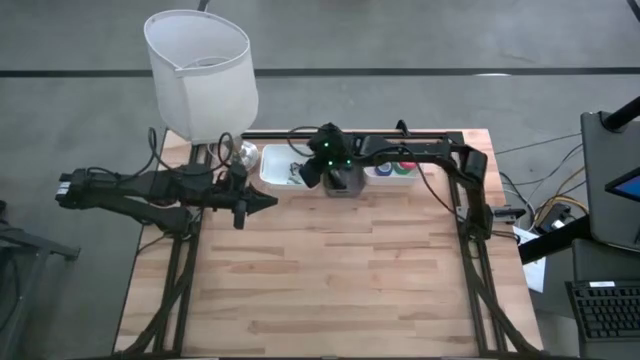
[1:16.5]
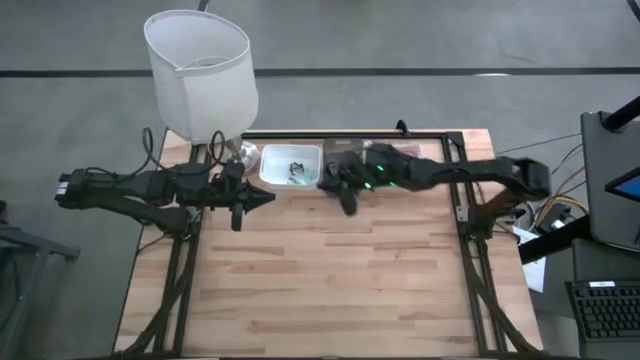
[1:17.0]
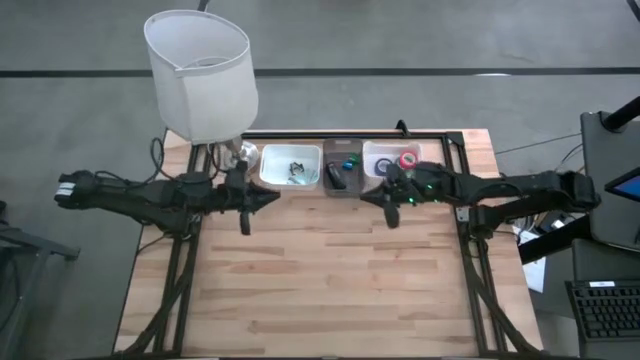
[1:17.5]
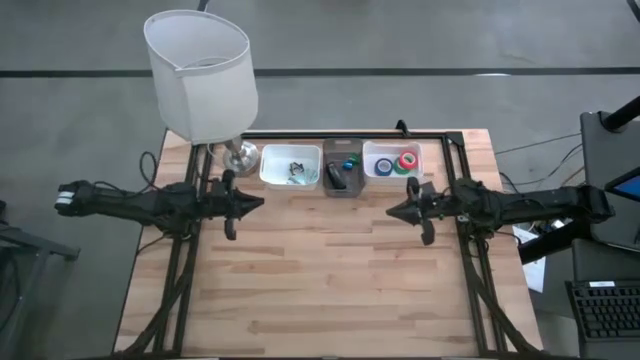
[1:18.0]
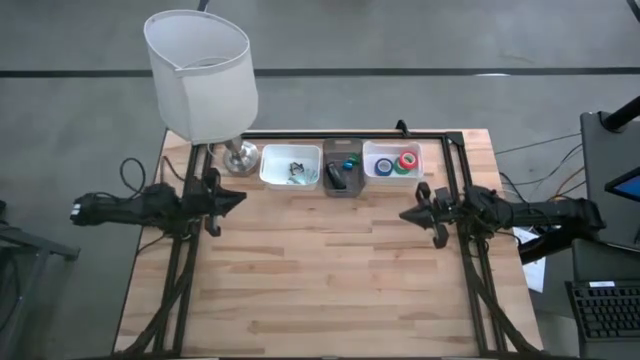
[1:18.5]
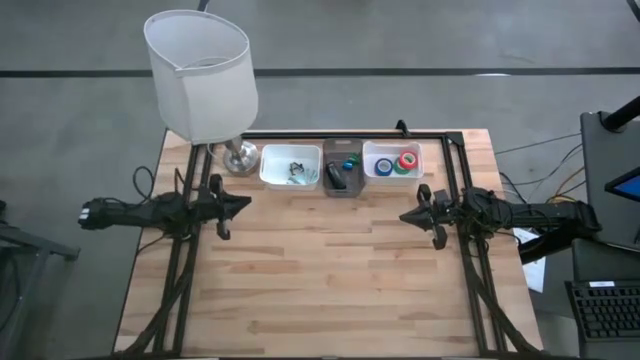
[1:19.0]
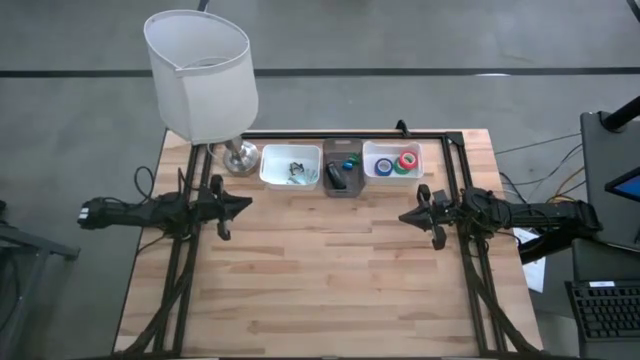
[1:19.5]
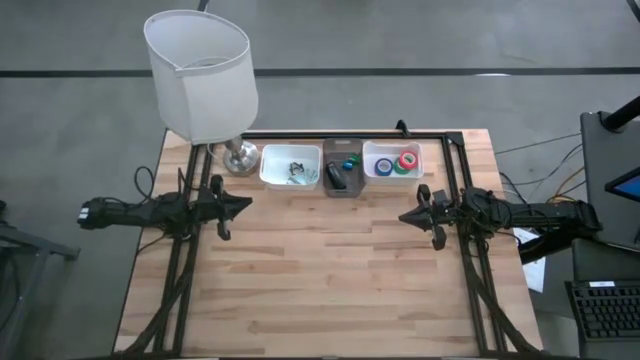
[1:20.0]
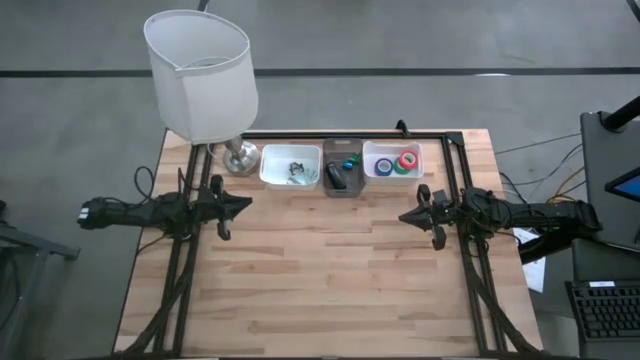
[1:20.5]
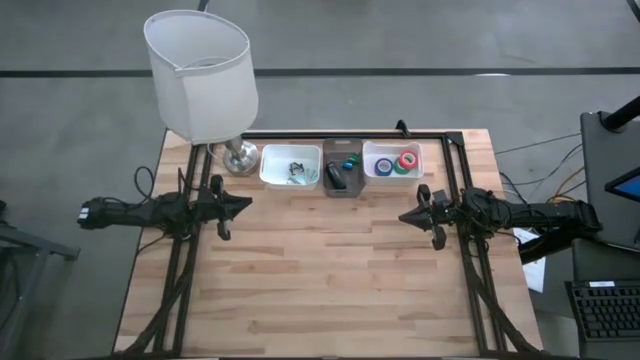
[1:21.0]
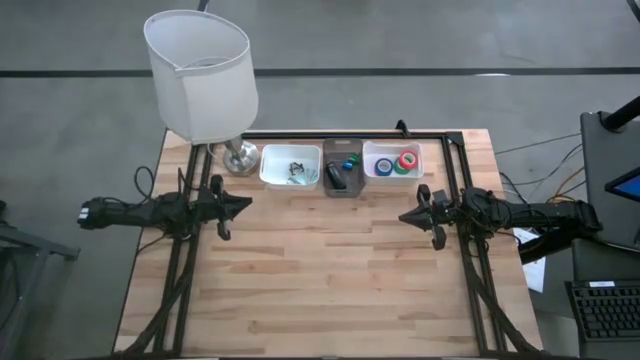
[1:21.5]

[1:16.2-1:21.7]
Task: Pick and place Stapler, Stapler remover, tape
Return to Home Position

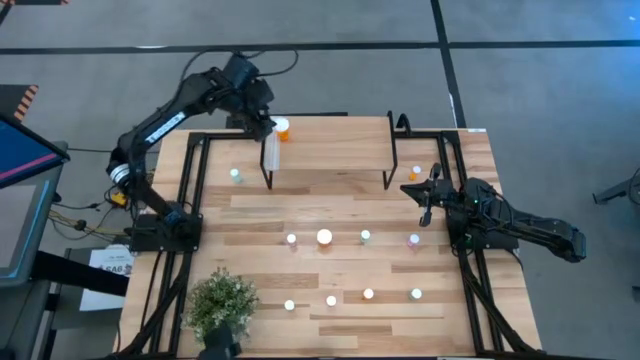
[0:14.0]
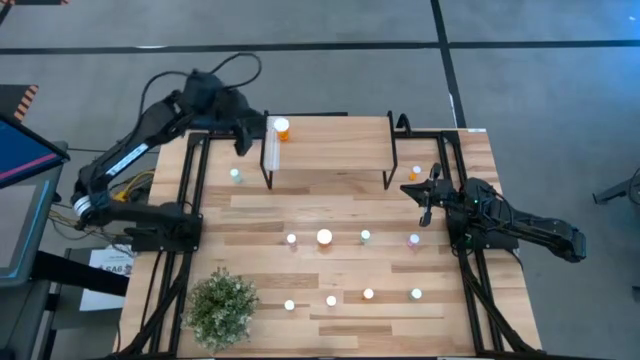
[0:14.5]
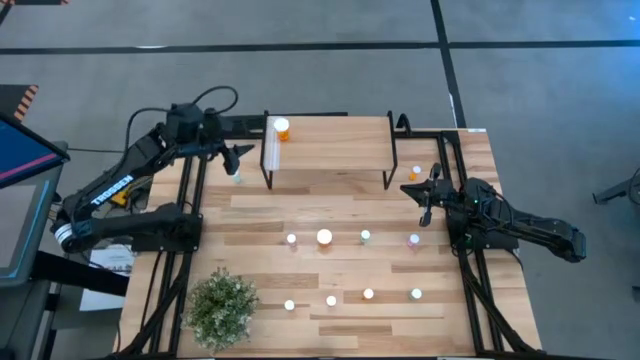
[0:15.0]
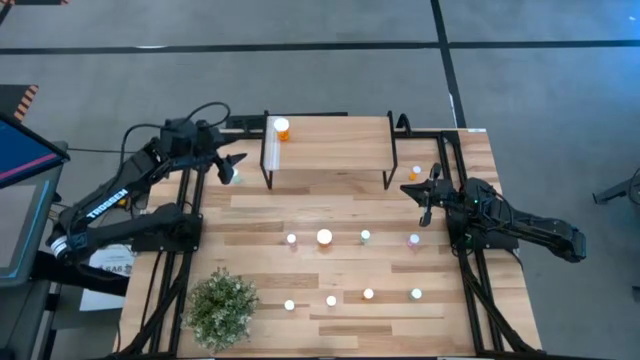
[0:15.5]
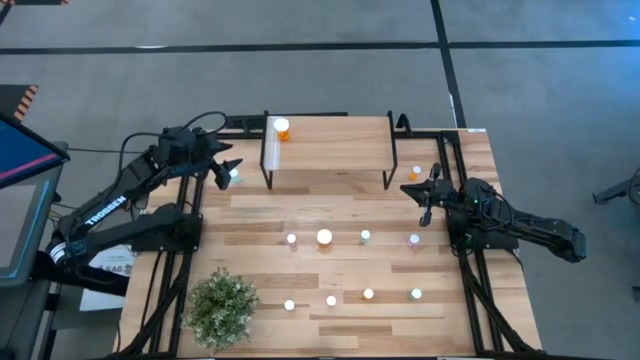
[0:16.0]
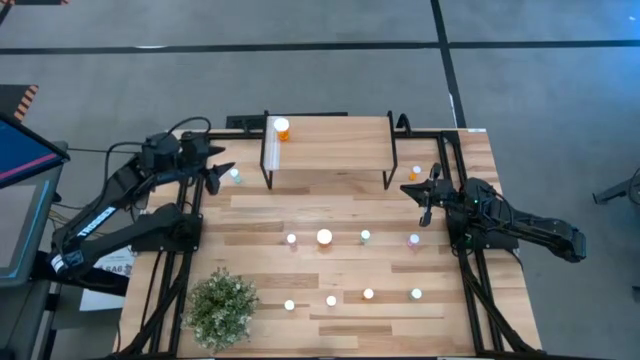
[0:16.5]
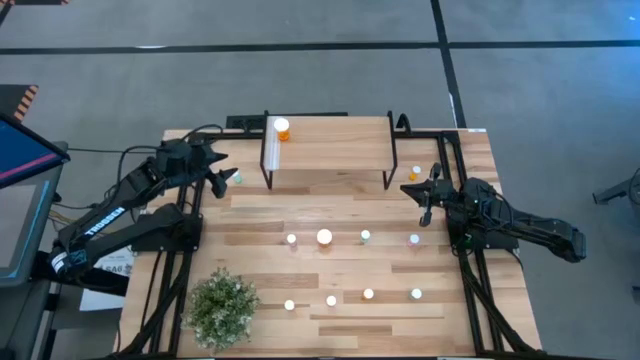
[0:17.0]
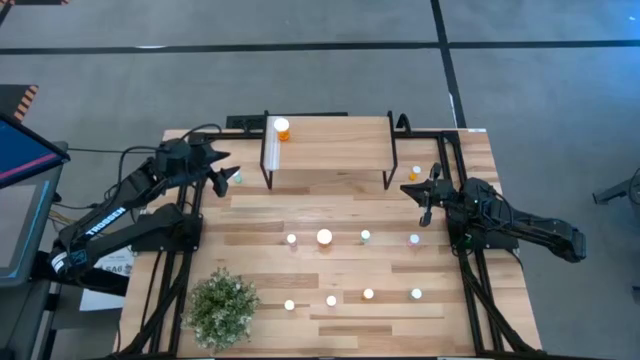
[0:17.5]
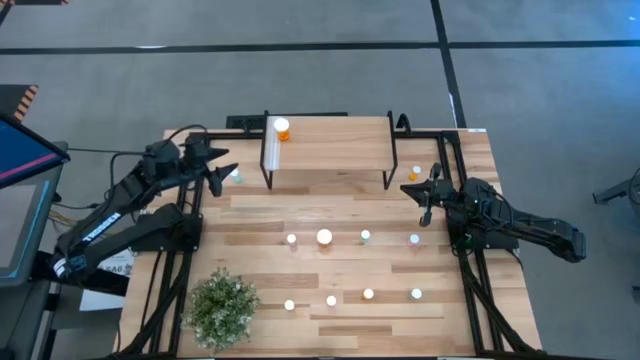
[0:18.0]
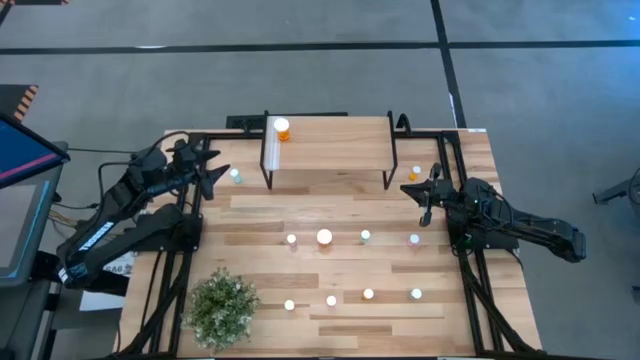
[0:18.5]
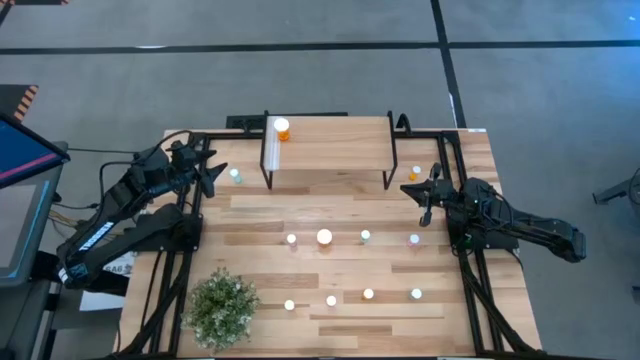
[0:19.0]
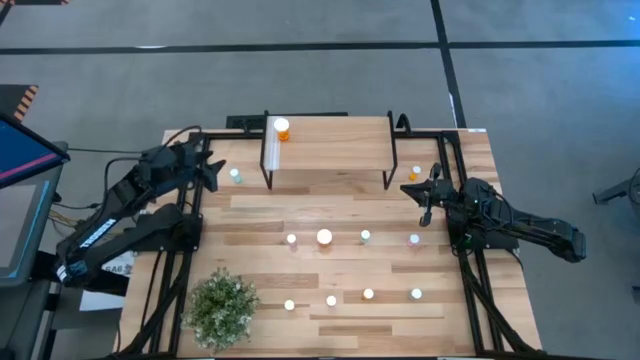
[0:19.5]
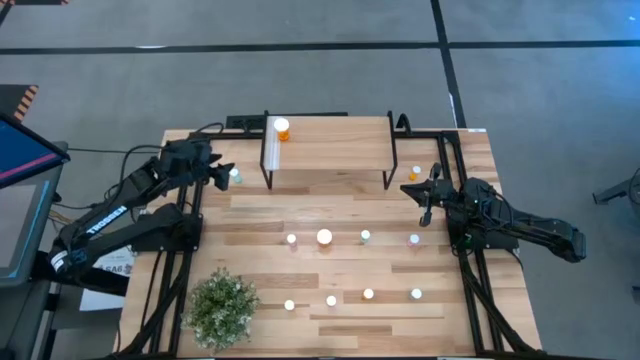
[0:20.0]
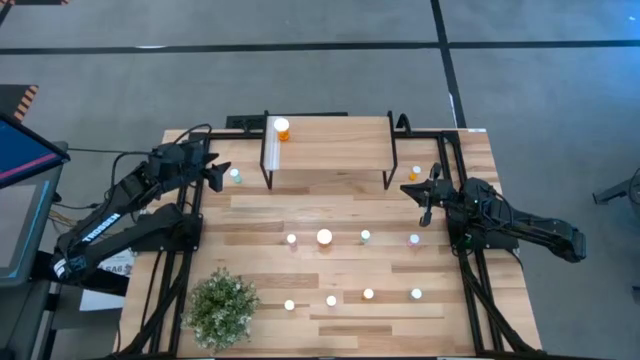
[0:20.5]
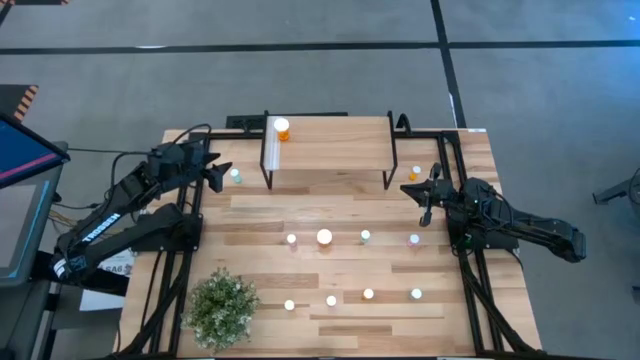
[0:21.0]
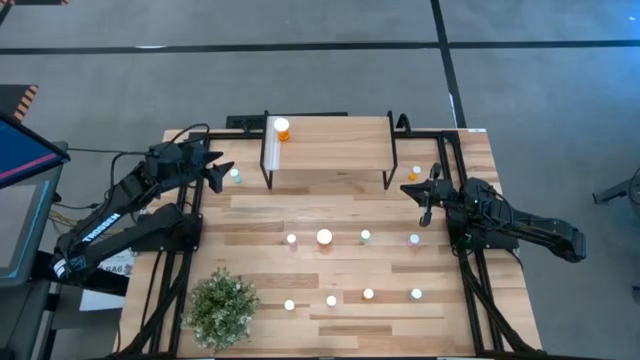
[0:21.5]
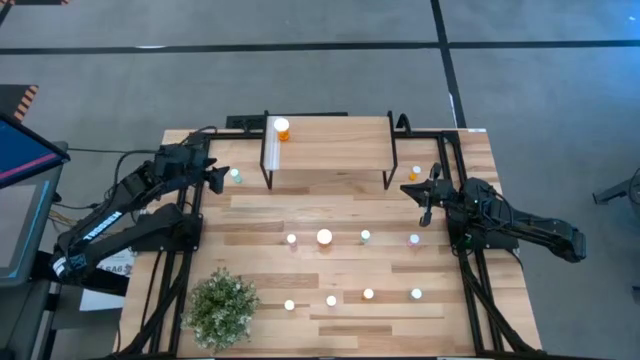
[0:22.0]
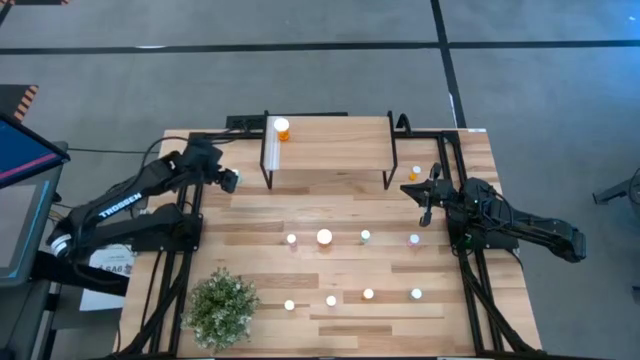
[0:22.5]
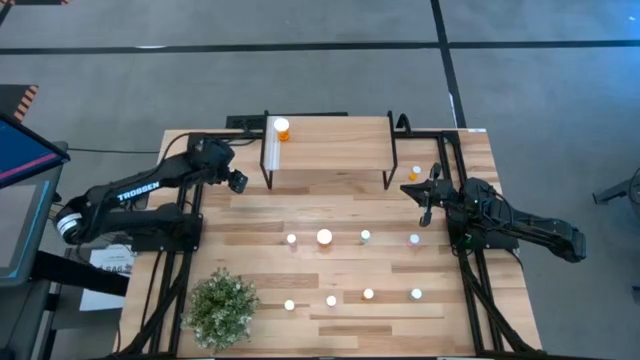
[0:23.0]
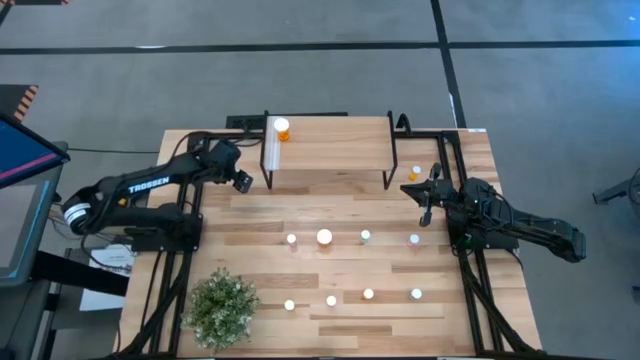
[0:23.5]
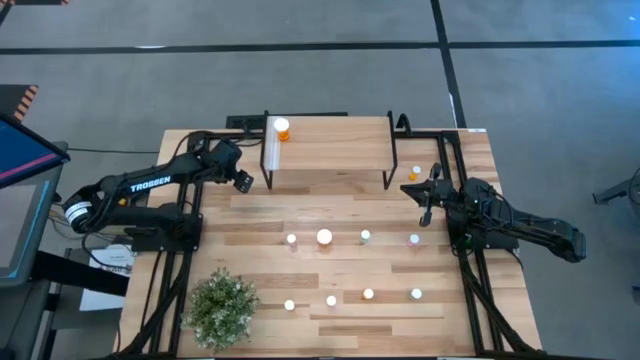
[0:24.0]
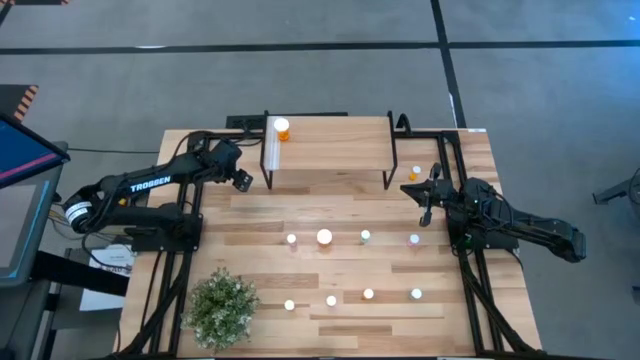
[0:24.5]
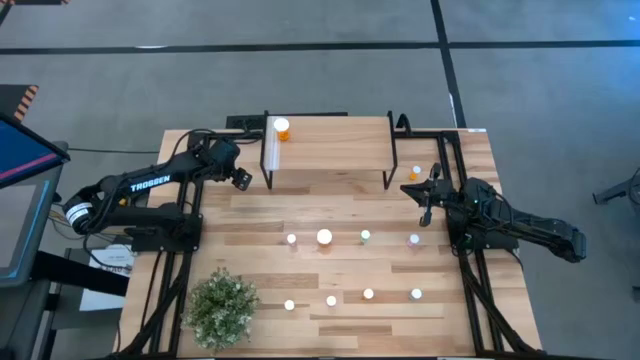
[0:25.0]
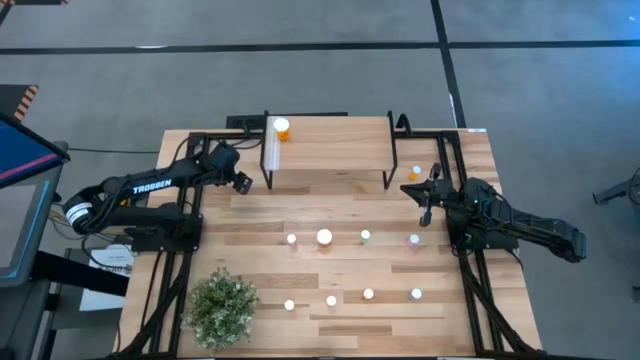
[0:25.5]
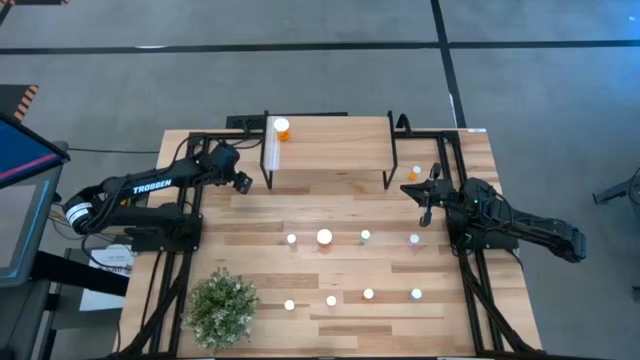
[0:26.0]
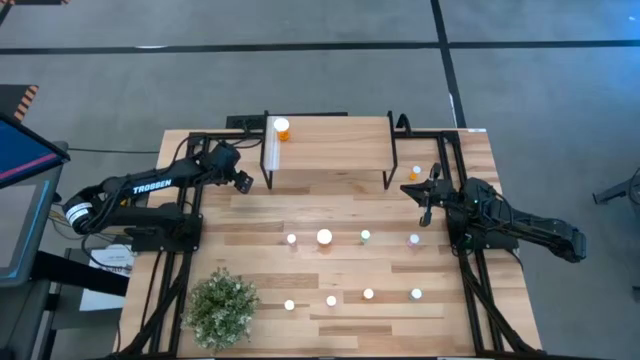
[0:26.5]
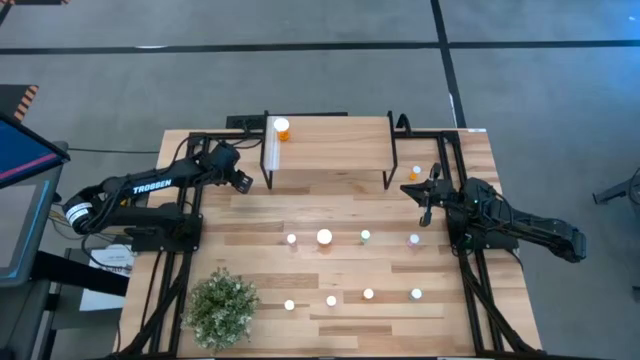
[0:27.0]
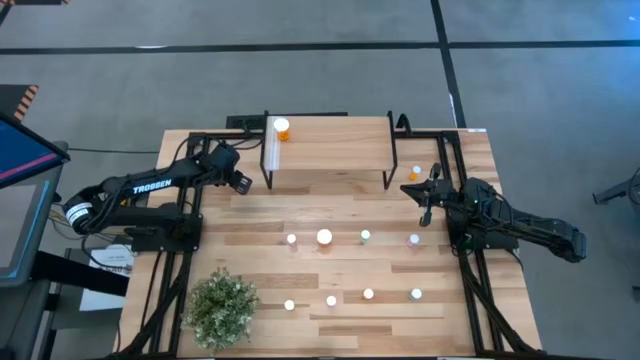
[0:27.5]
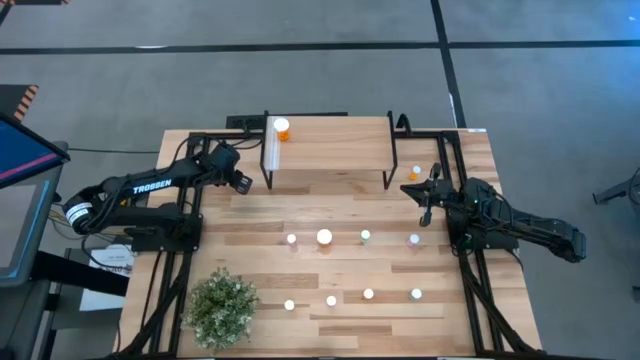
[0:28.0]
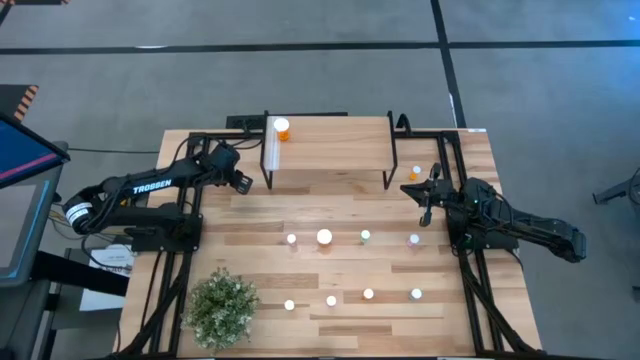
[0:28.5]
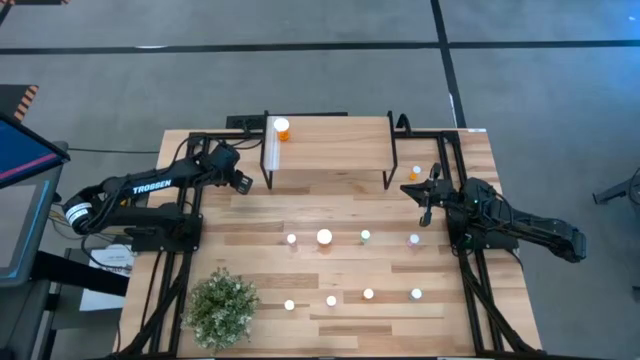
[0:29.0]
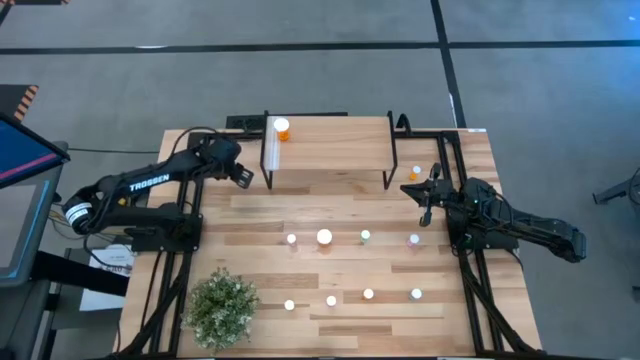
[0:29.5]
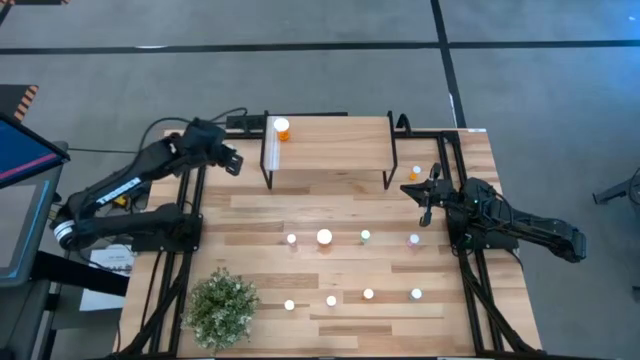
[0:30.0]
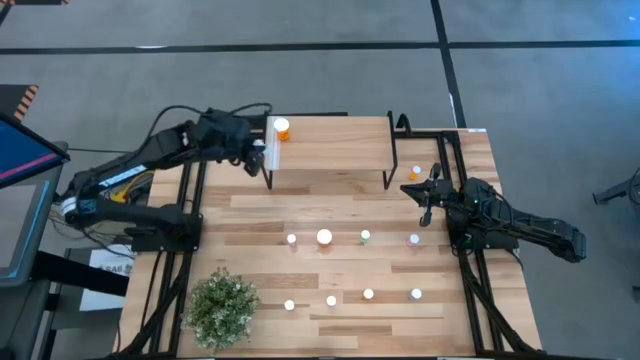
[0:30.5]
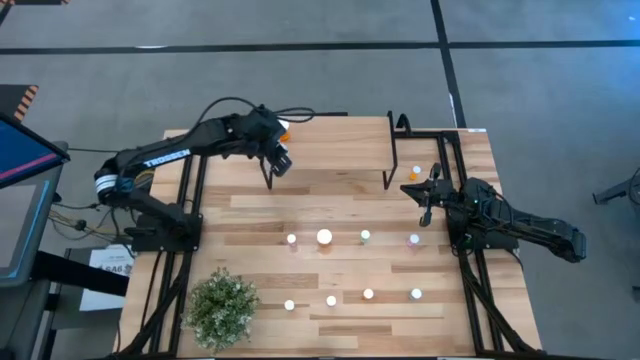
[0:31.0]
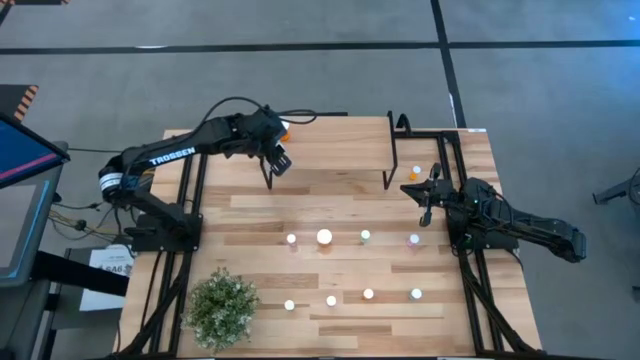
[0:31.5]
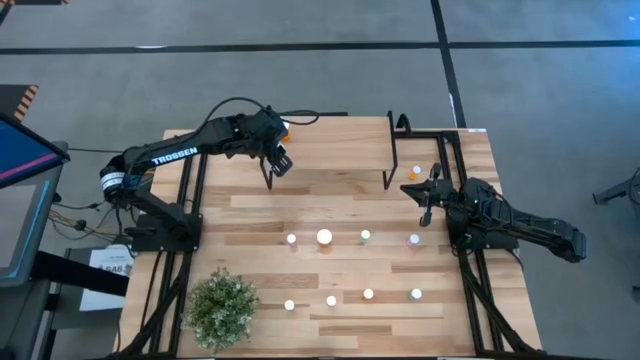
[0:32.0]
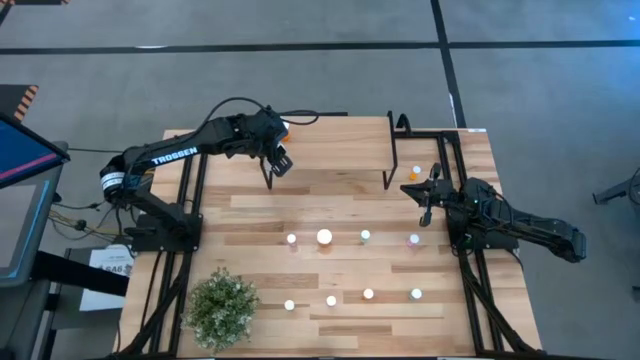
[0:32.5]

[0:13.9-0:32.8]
Task: Pick and place medicine bottles onto shelf by color
Put the blue pill bottle on the shelf
